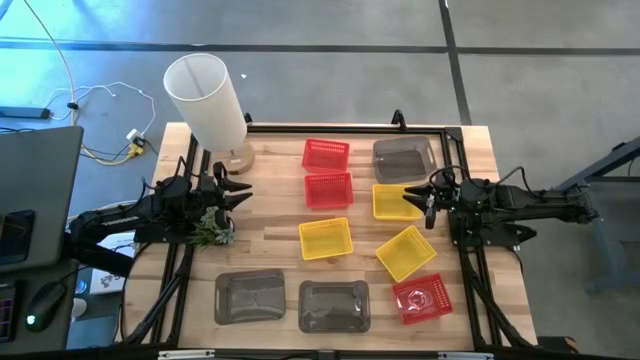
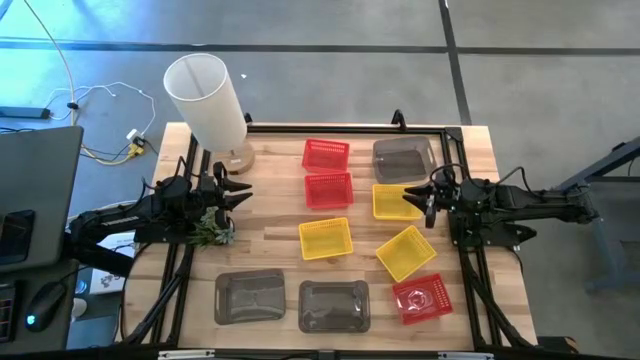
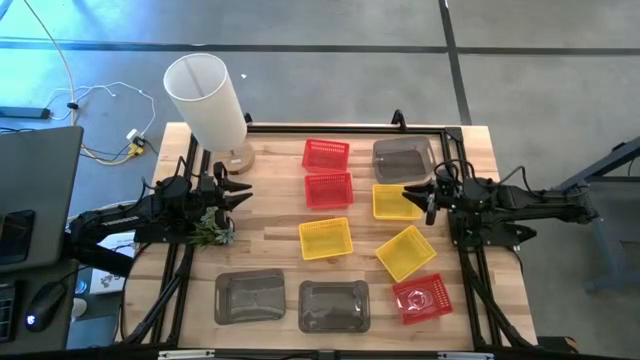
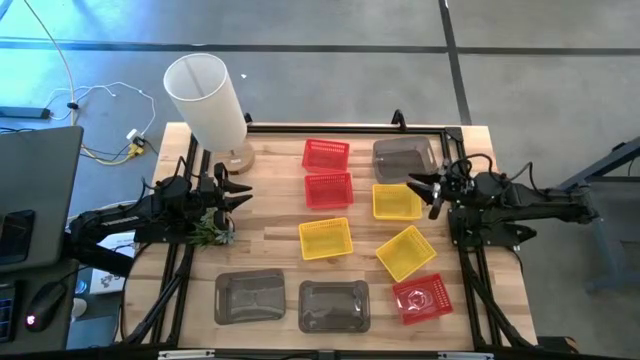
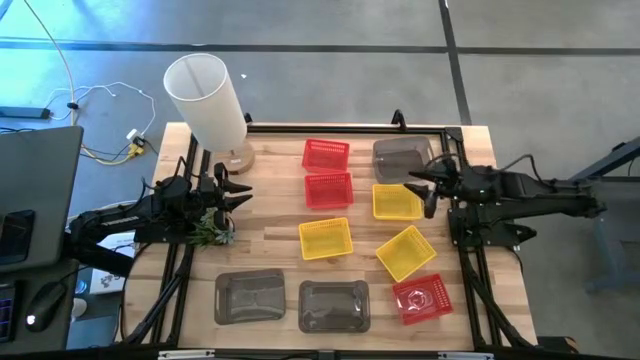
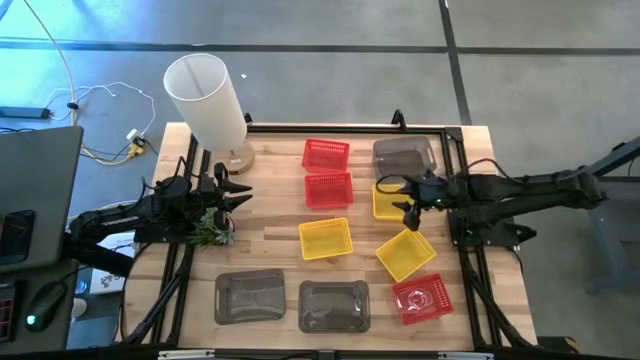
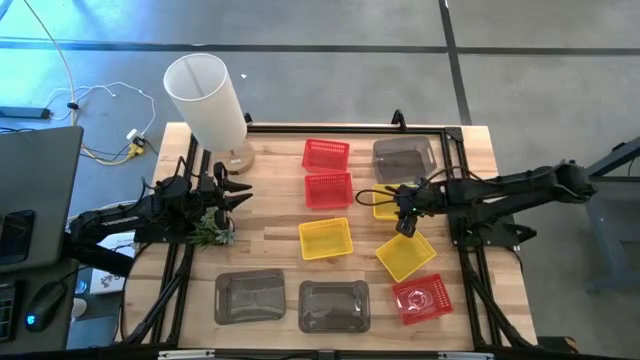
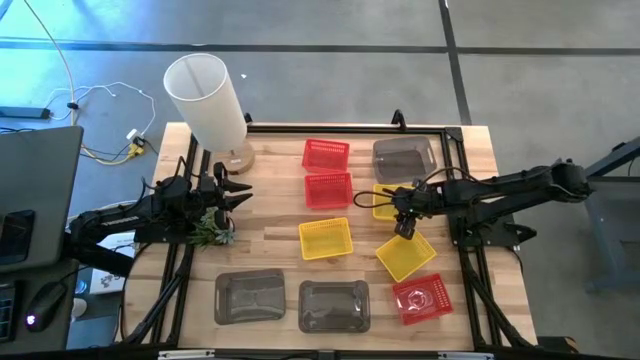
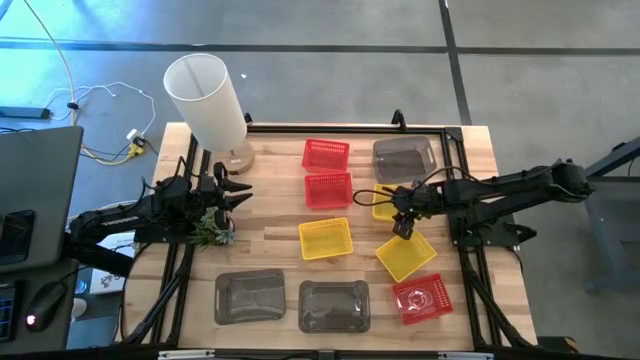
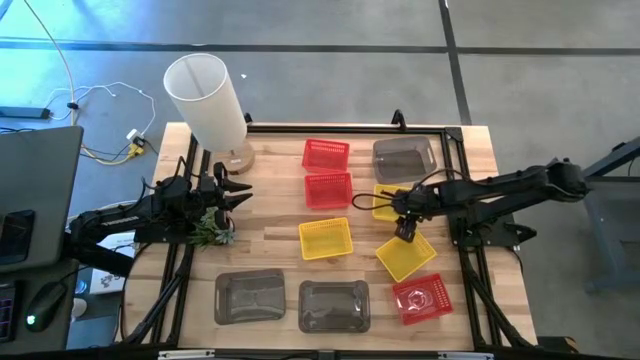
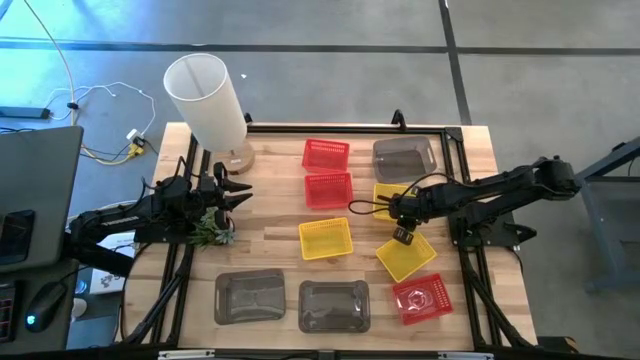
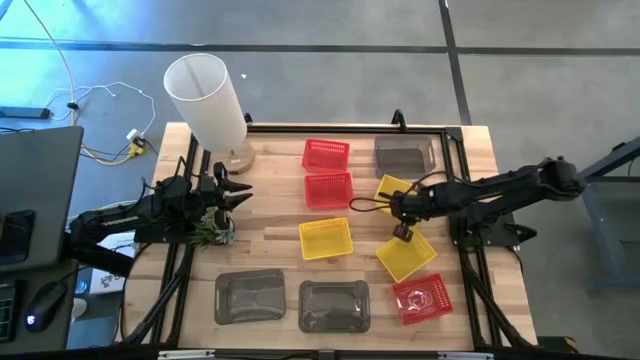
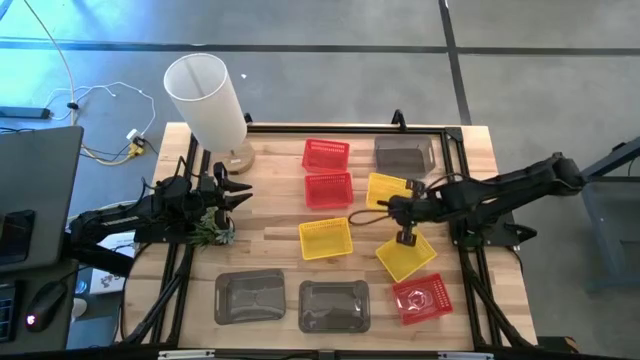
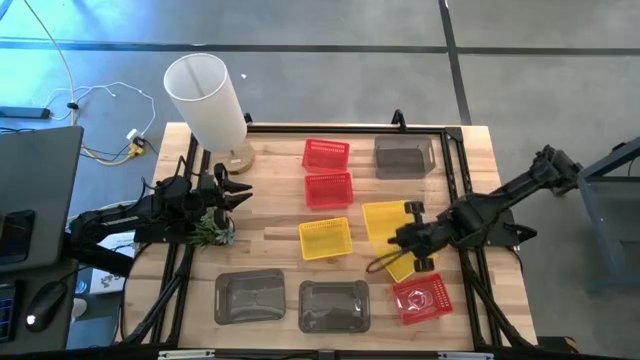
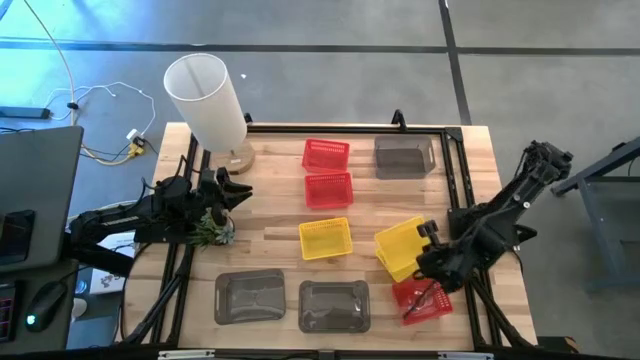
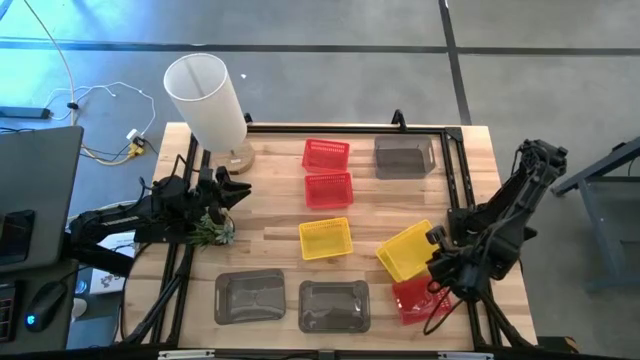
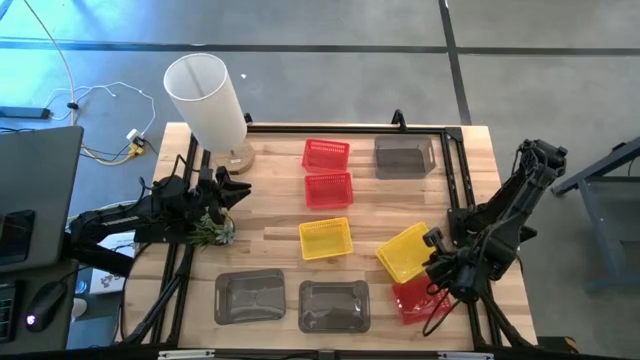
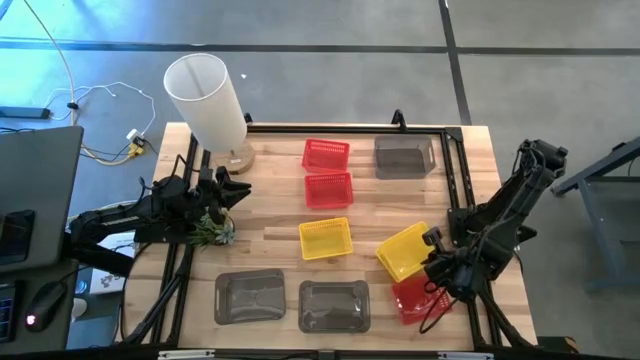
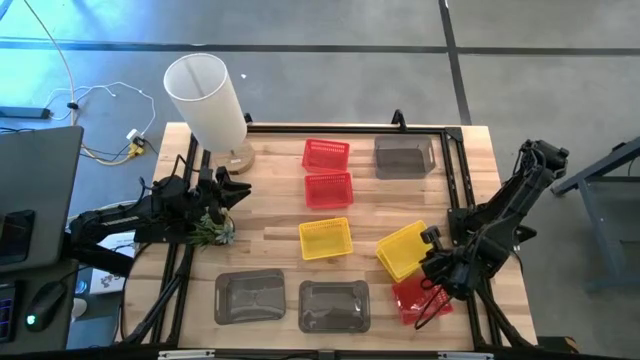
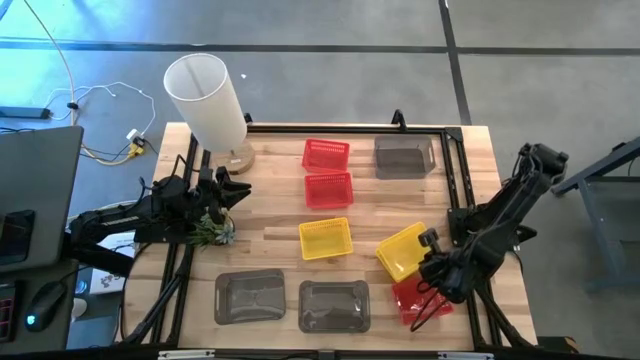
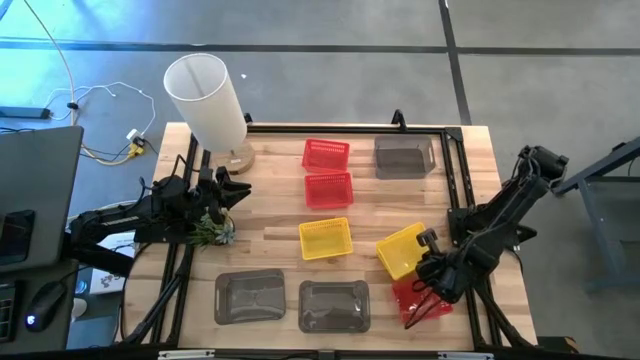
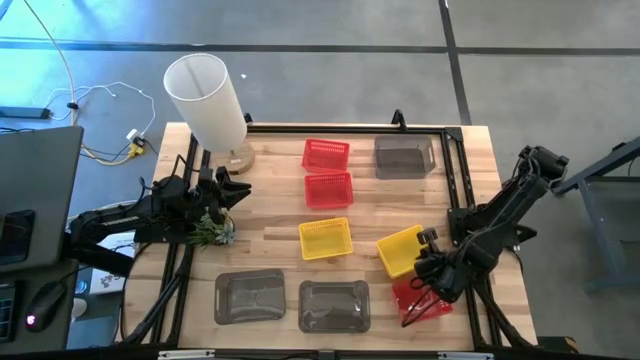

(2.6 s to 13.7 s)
Stack the top yellow bin into the bottom right yellow bin

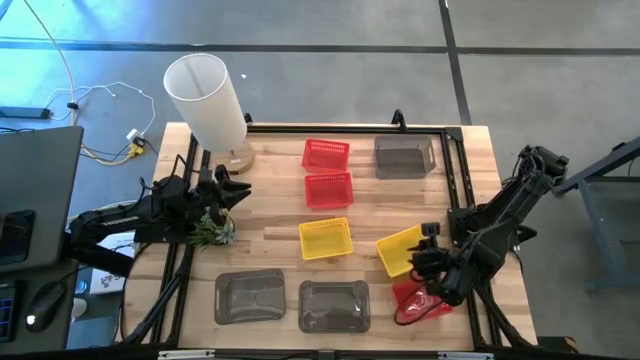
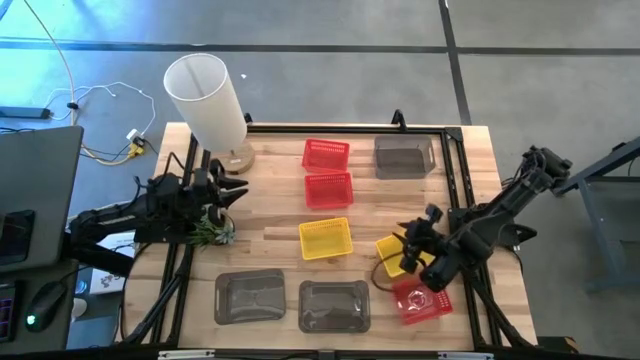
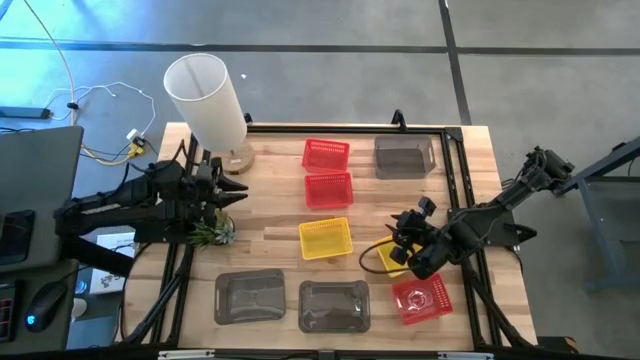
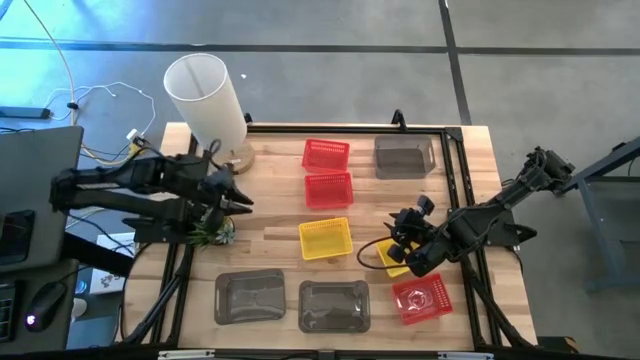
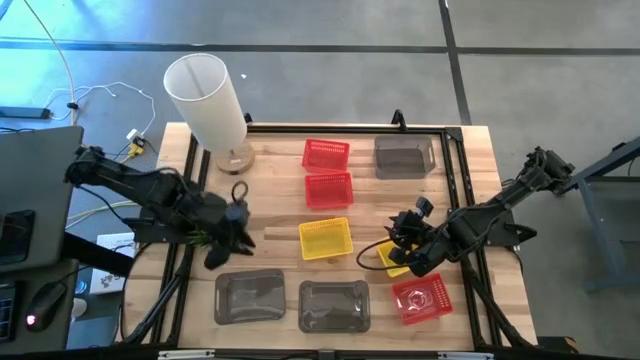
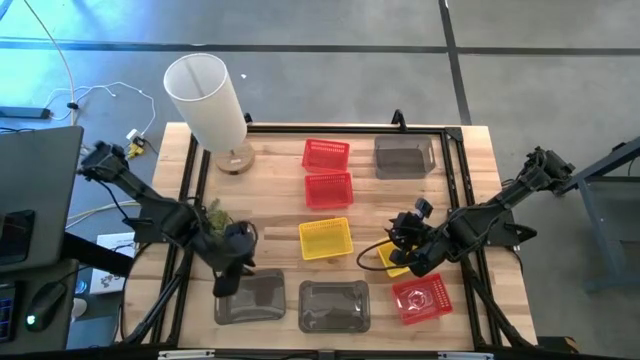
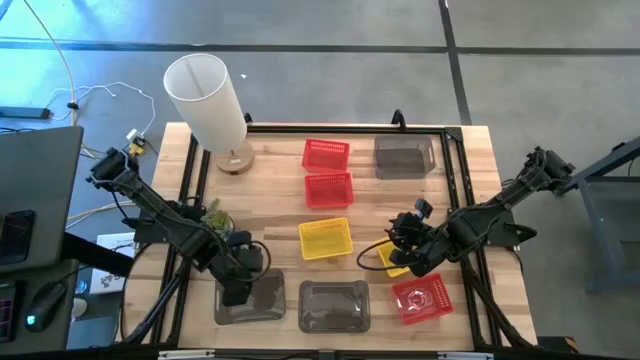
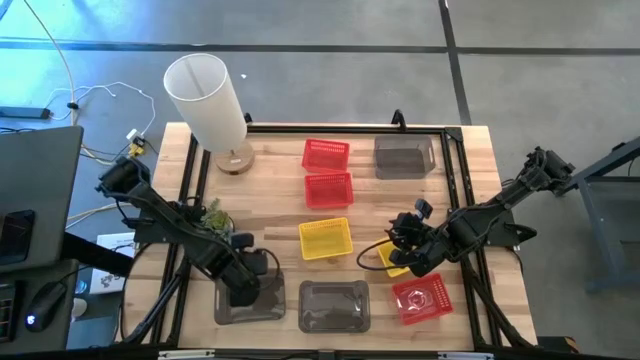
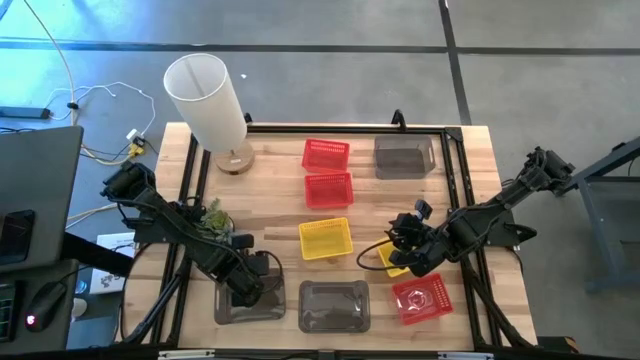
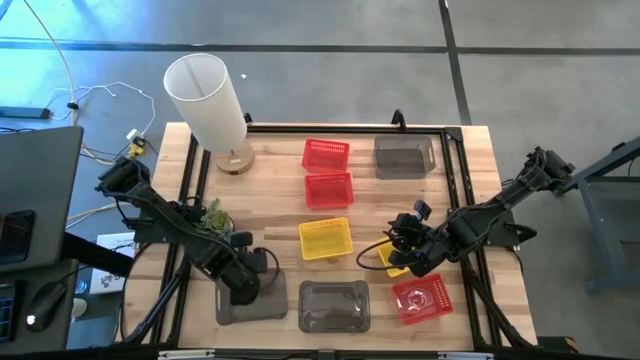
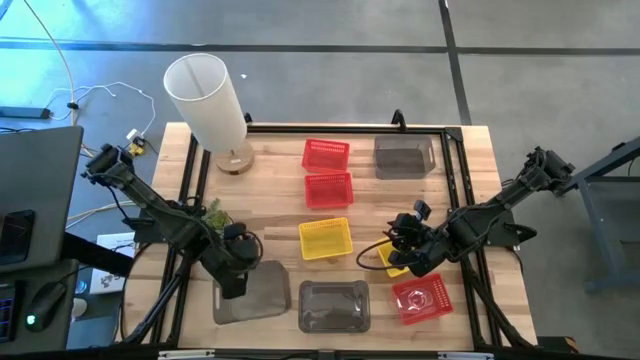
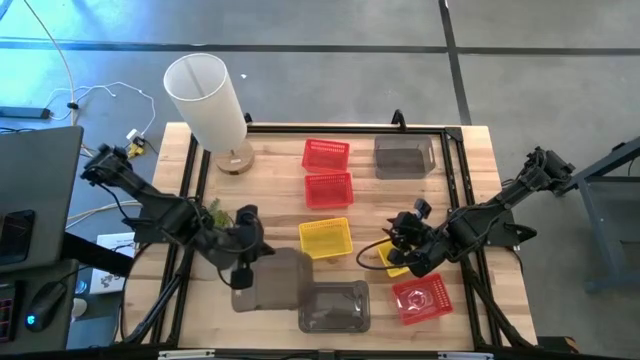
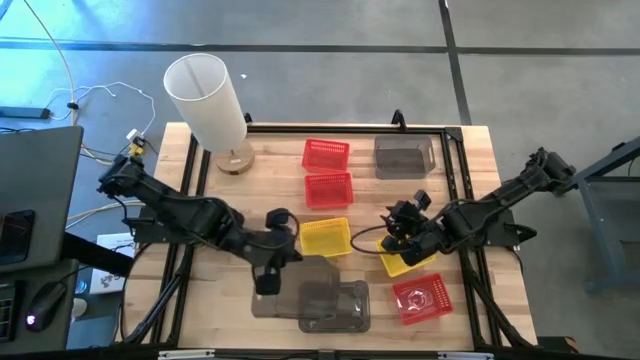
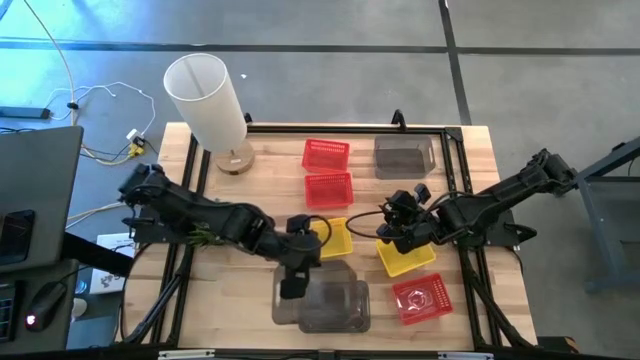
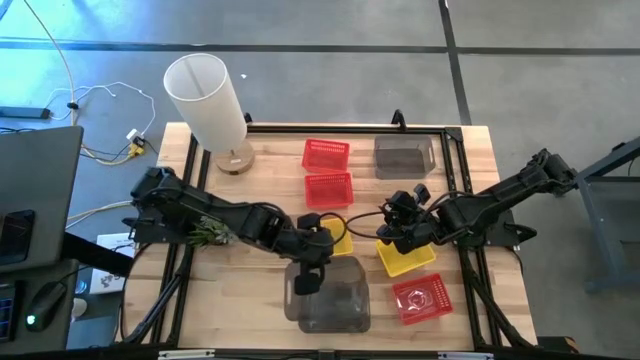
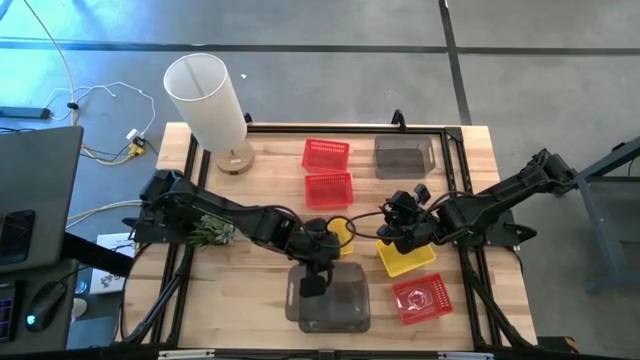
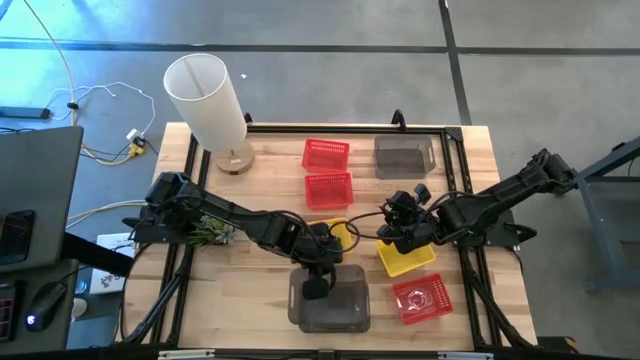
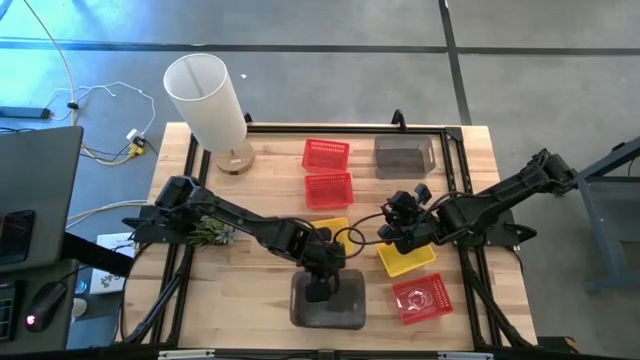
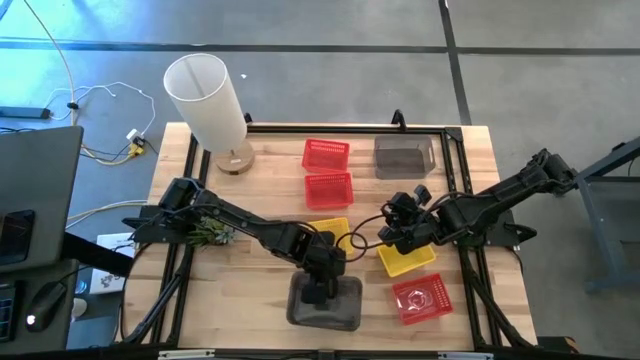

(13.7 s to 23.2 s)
Stack the bottom left black bin into the bottom right black bin
